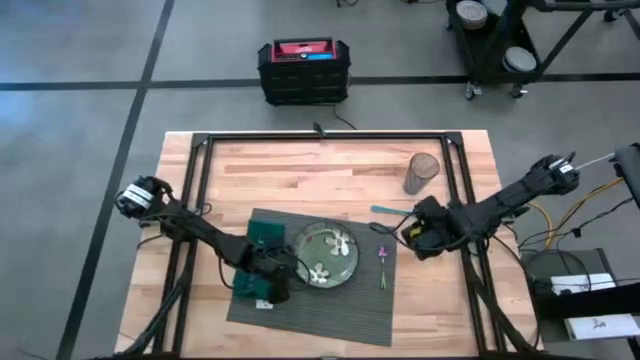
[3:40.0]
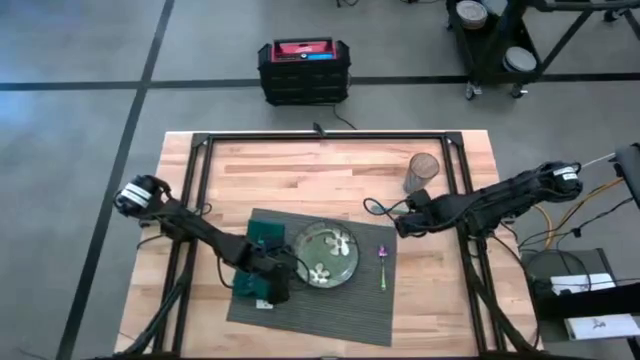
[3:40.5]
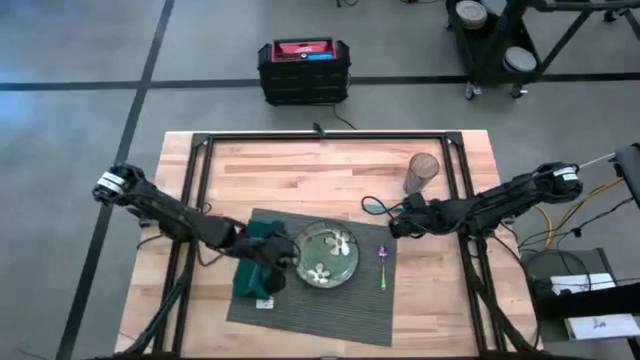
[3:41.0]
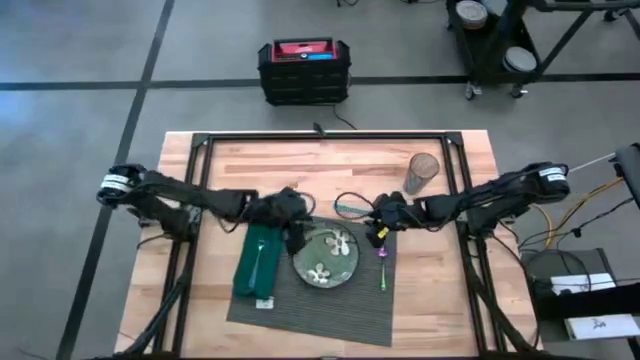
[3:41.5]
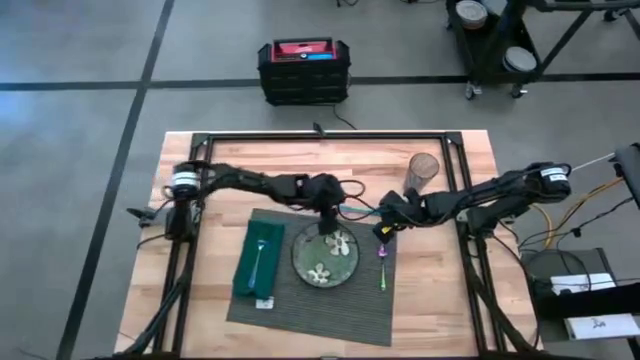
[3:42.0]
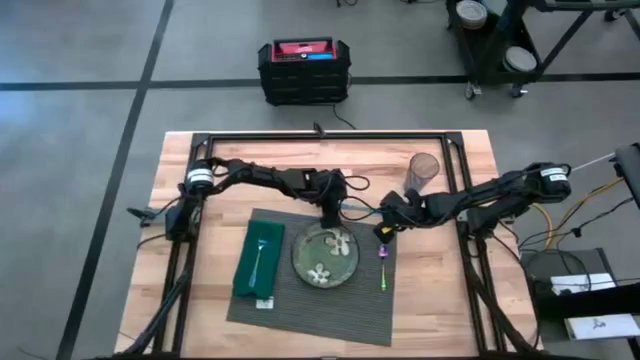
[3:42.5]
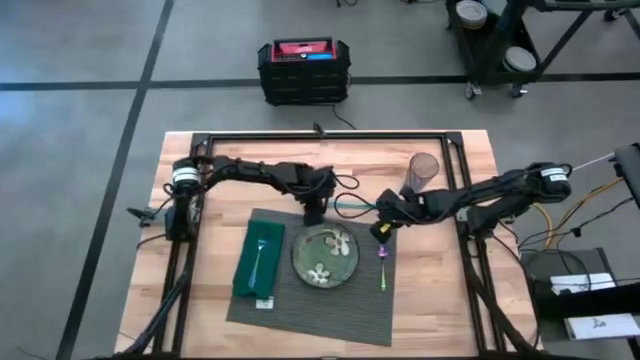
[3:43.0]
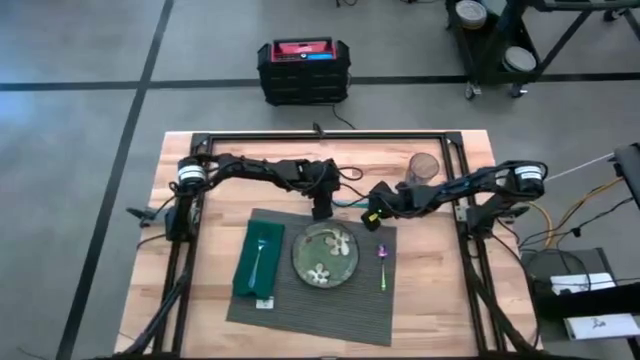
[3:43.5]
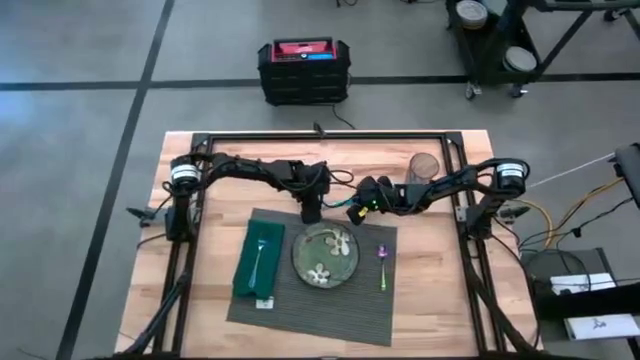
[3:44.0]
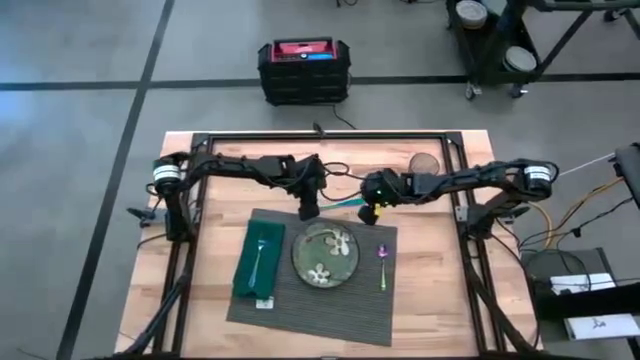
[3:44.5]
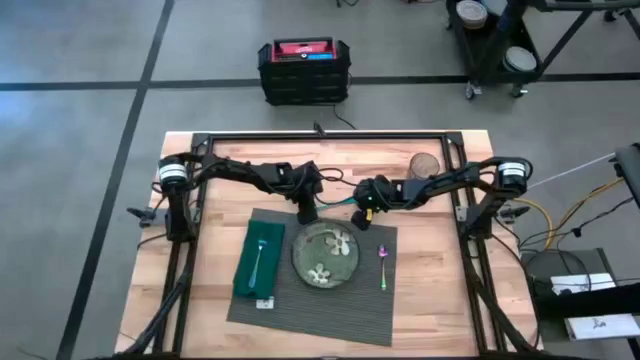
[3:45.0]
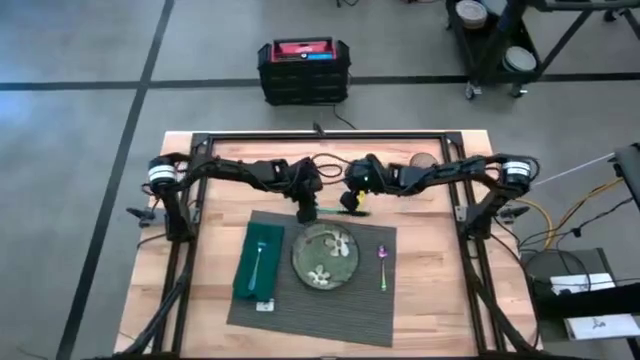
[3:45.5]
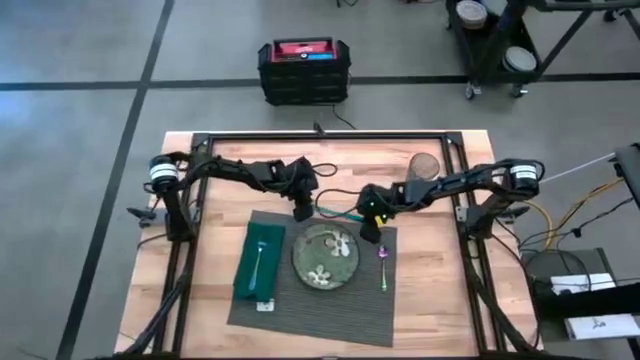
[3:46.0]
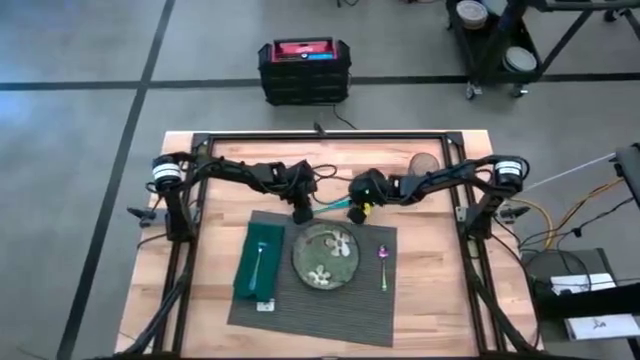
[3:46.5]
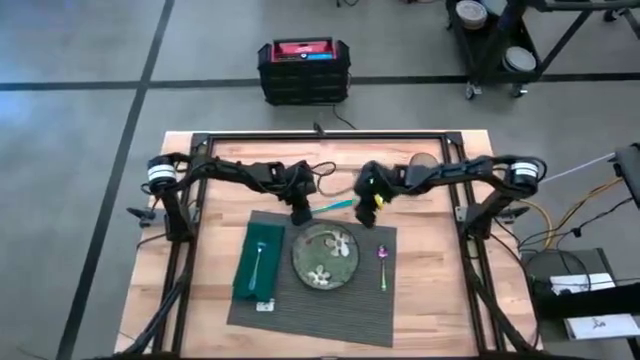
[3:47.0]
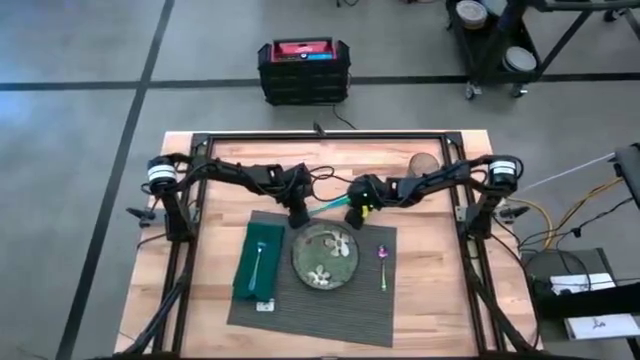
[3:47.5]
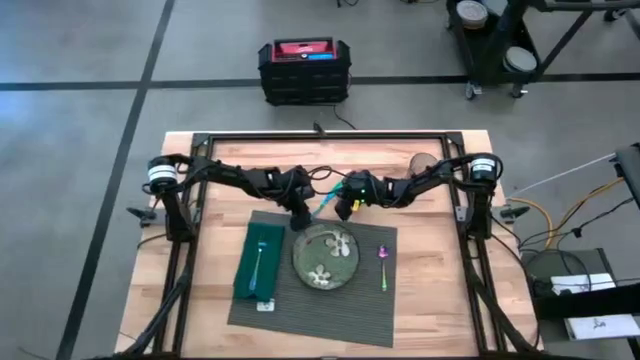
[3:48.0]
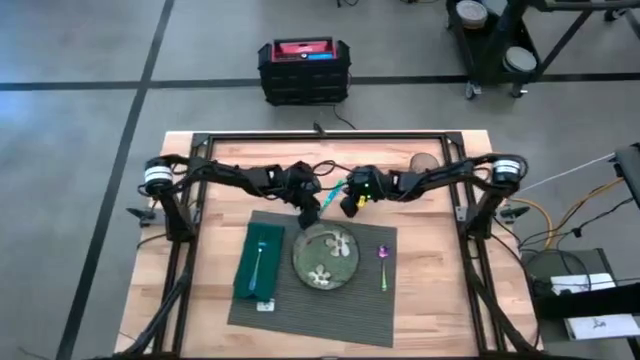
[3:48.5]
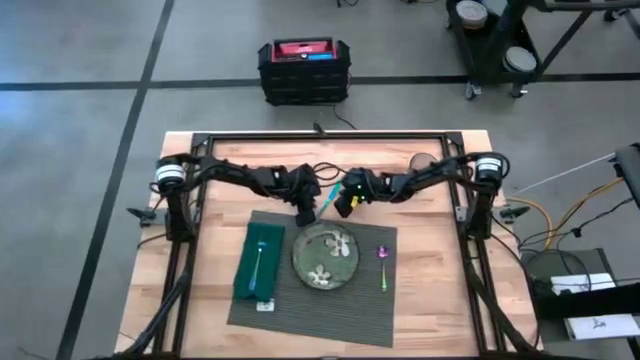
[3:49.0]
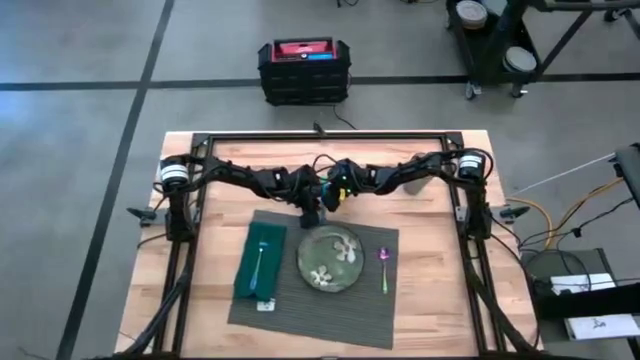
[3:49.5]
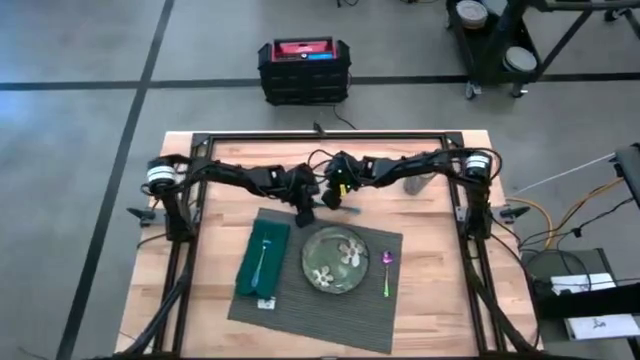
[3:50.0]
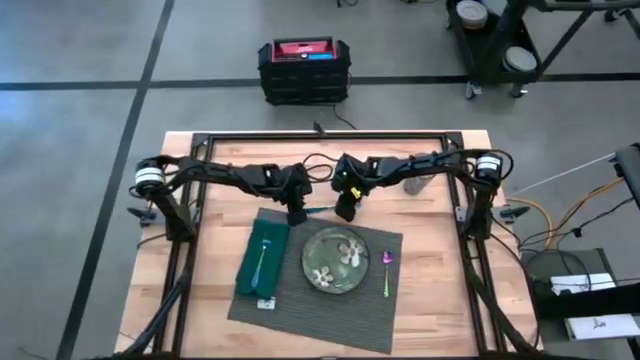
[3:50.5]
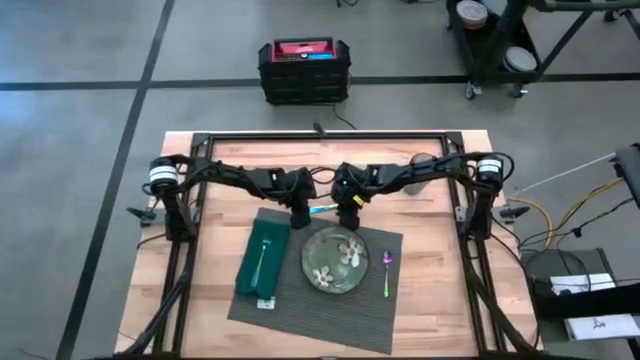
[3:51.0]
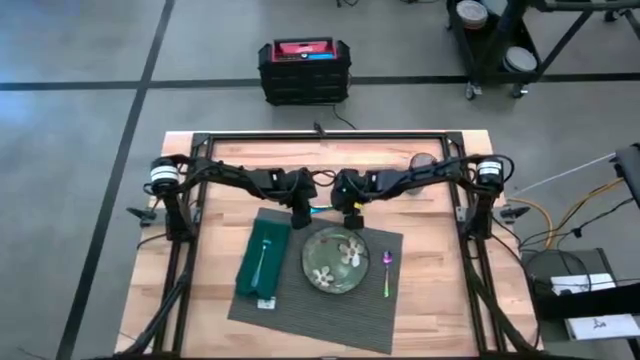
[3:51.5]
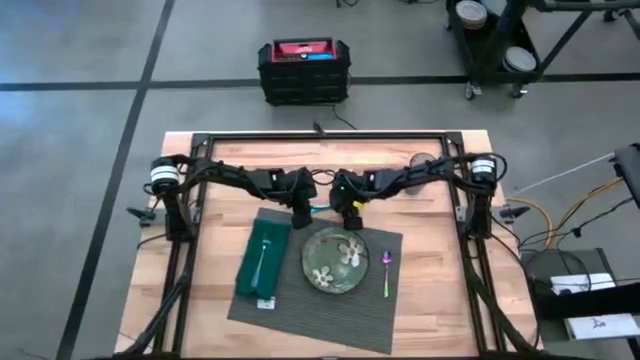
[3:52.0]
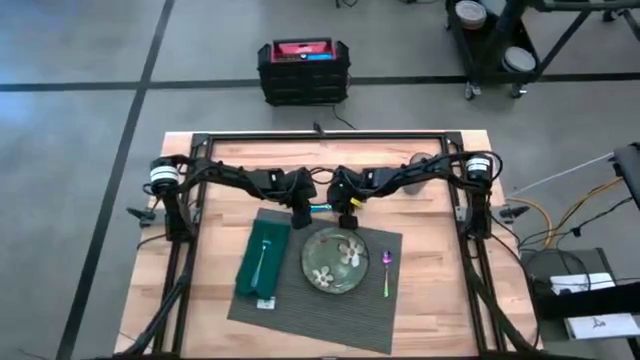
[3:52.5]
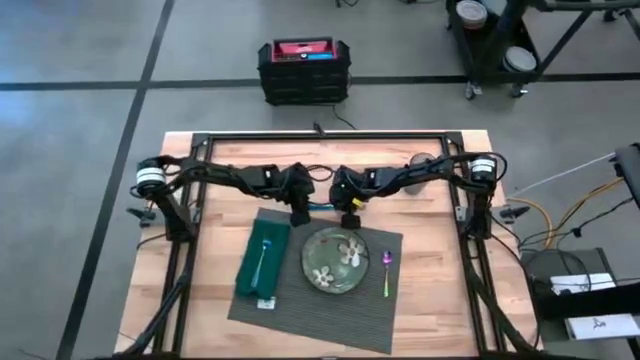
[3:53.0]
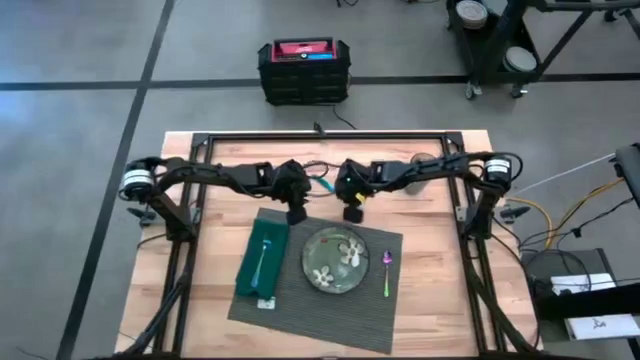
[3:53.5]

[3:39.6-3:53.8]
Task: Set table place
Put the iridescent blue knife on the gray place mat

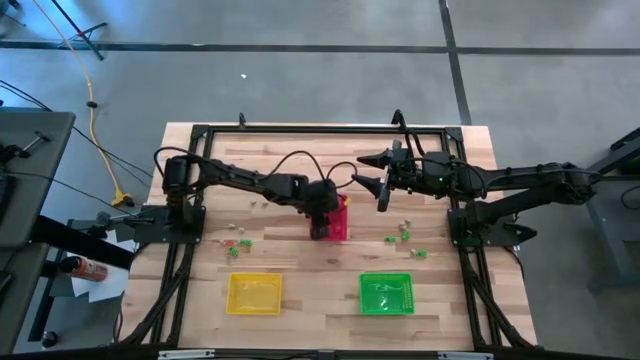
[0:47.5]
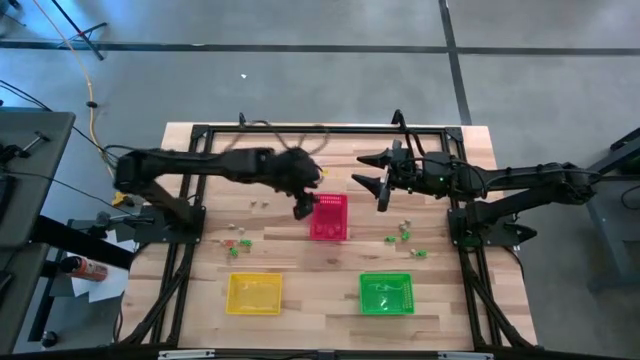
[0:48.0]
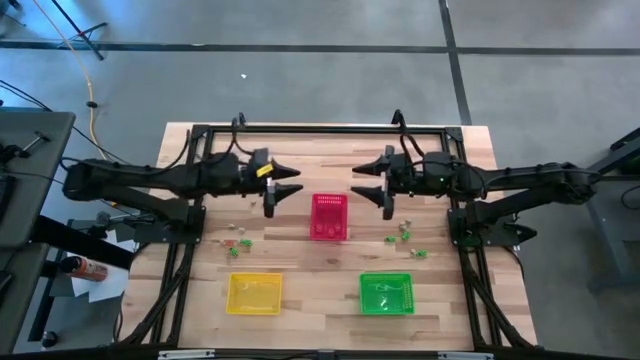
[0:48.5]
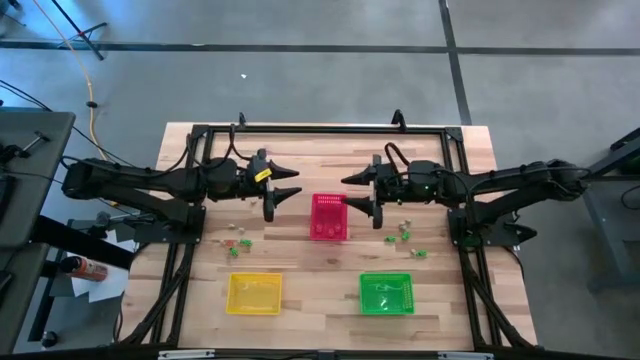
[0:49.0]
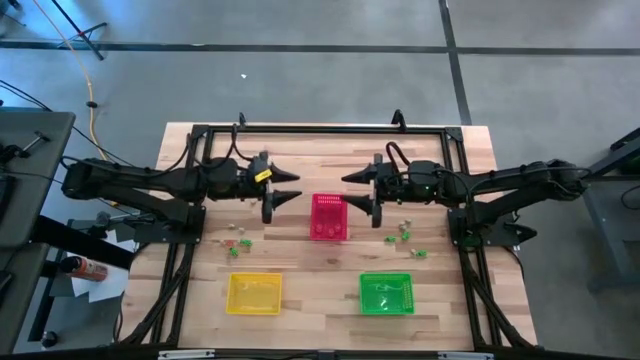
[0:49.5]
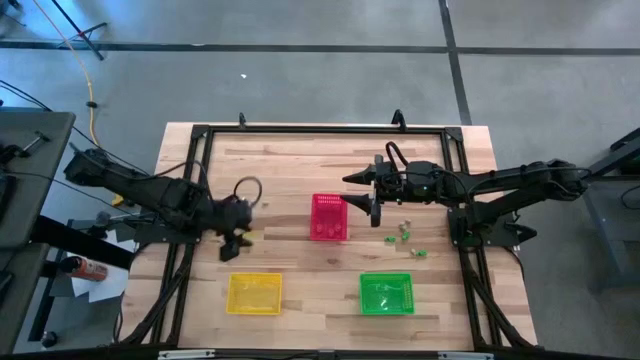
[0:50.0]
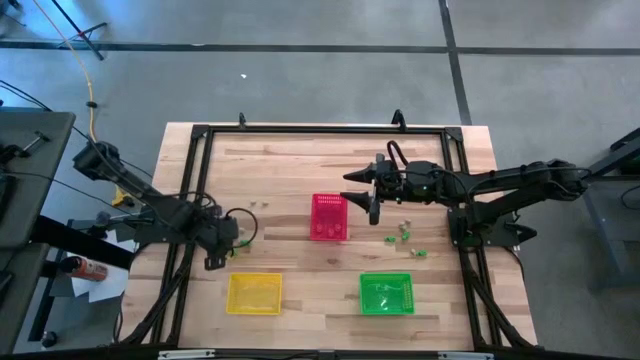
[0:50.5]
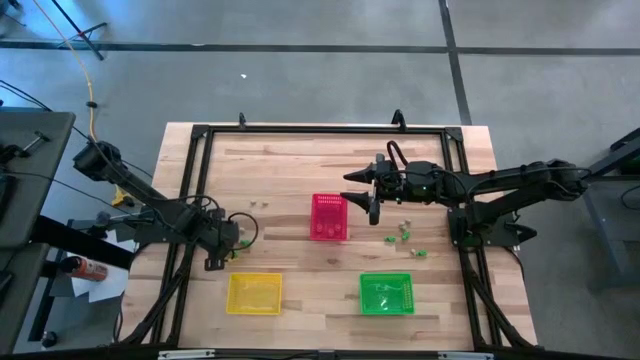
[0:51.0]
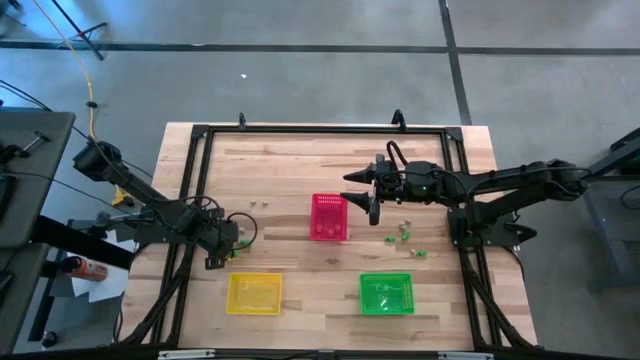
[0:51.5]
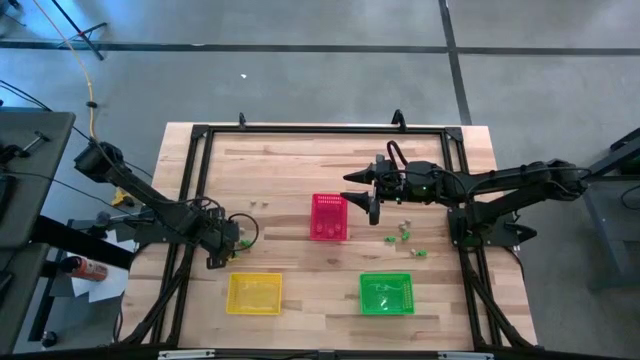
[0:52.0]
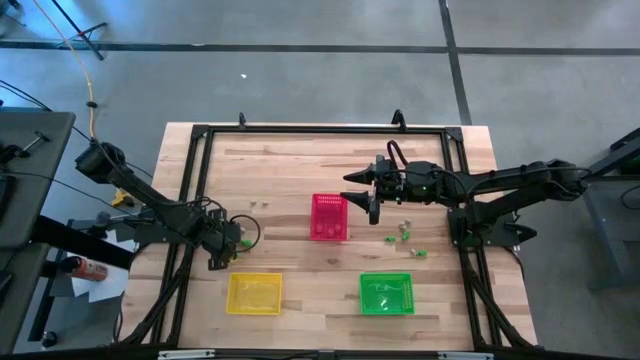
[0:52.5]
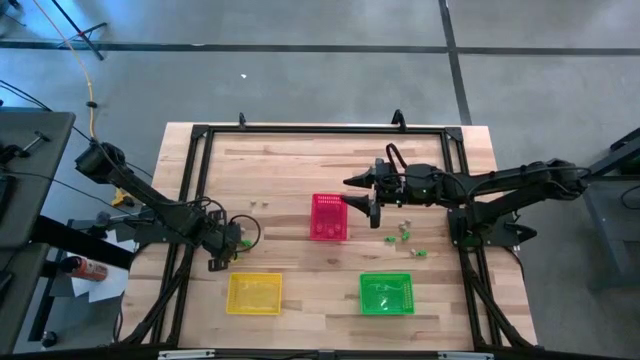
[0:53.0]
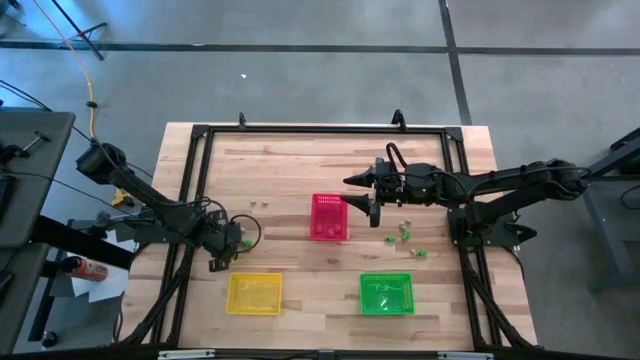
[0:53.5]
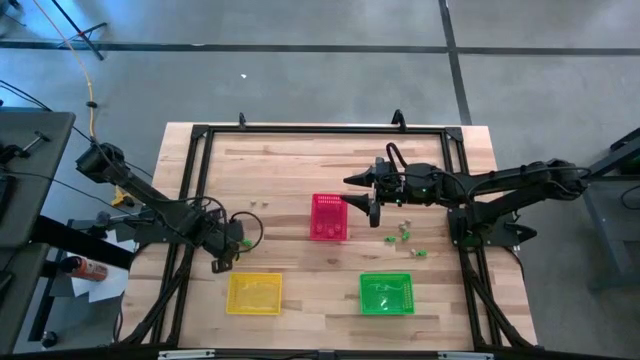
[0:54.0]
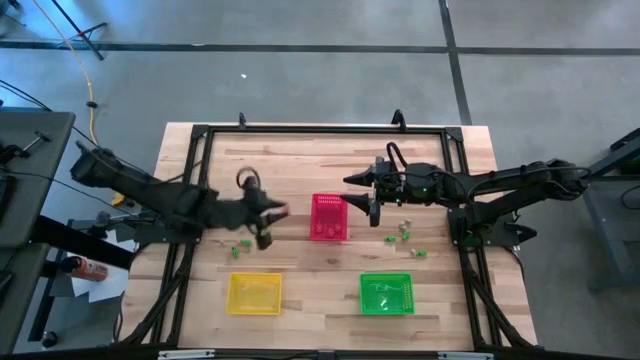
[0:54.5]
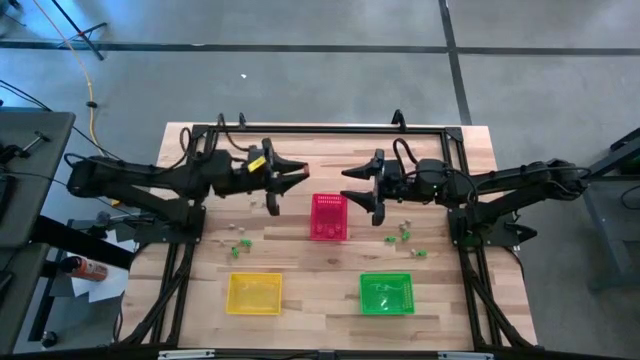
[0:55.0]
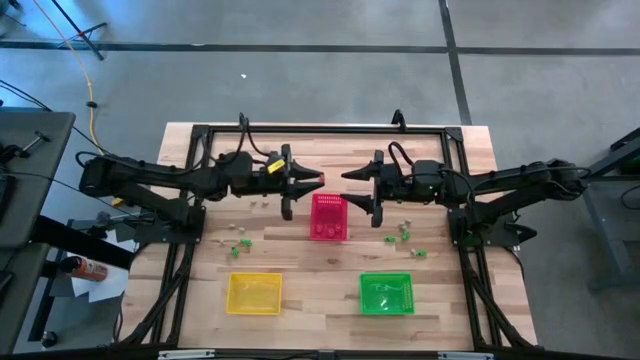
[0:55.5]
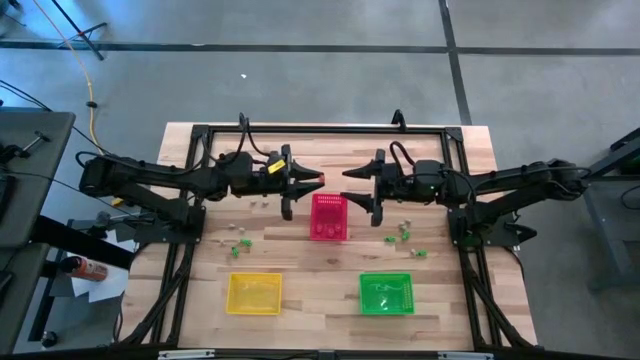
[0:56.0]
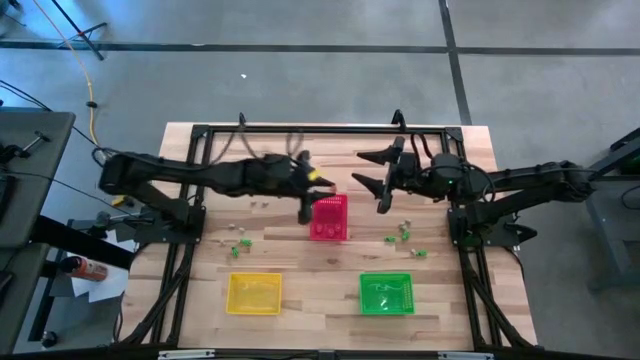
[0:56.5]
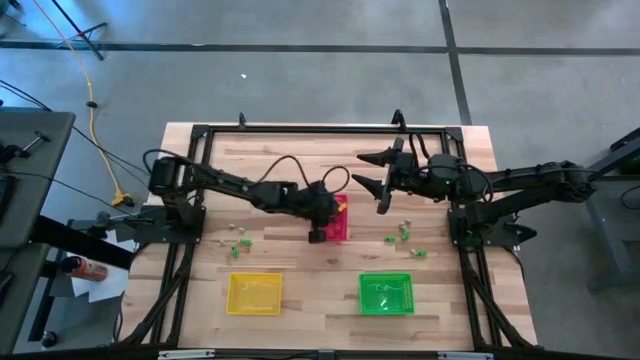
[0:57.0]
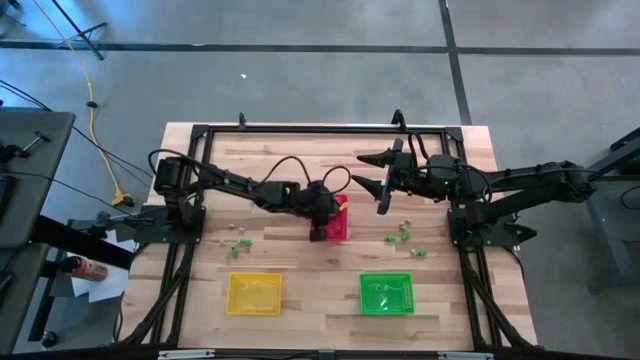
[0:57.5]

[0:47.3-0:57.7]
Task: Sort Halloween decoration
Put the orange pumpkin toy into the red bin
